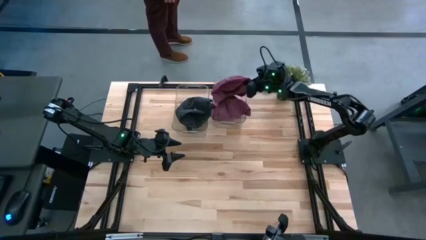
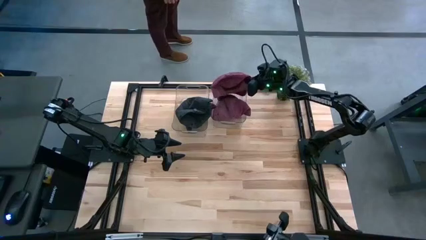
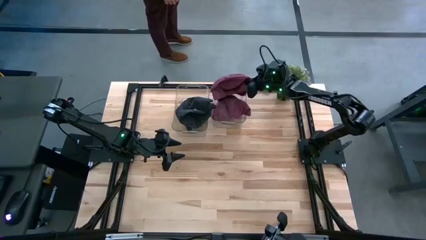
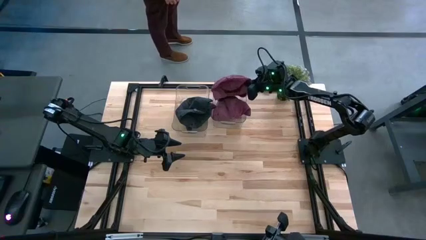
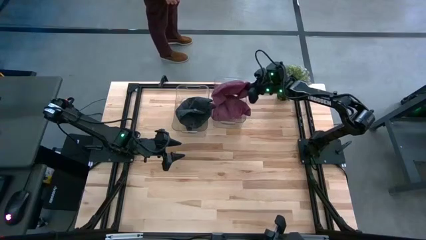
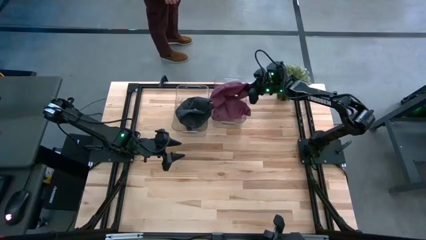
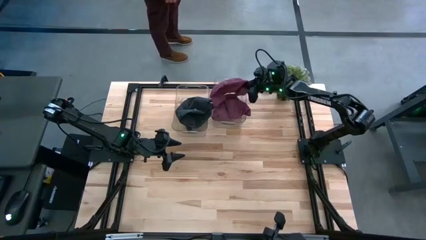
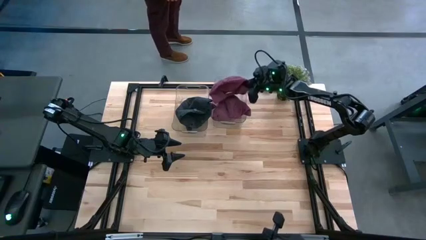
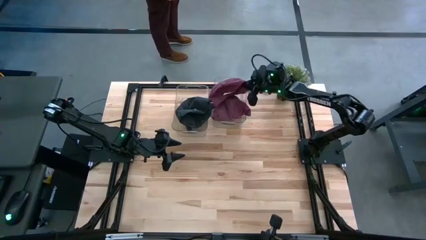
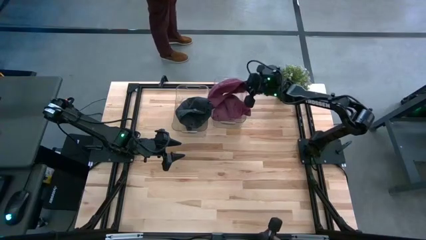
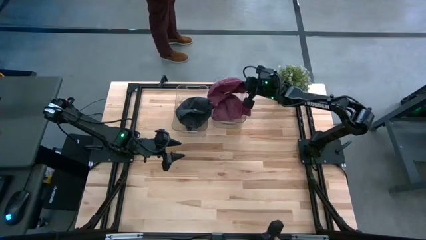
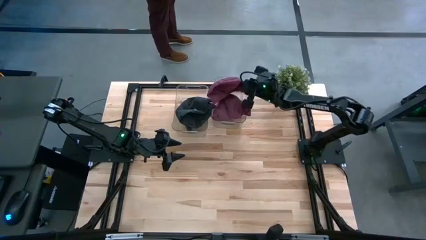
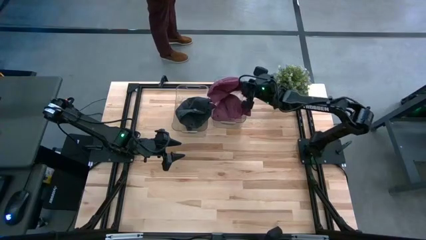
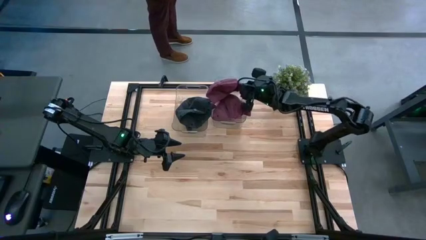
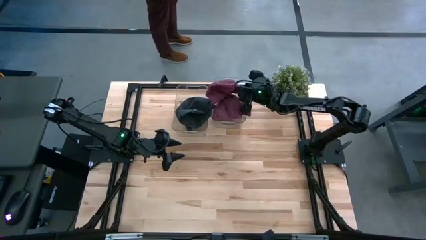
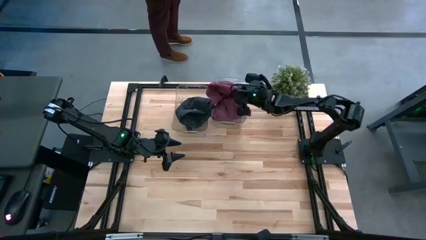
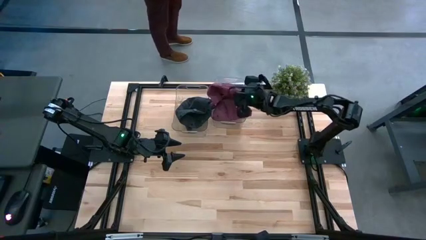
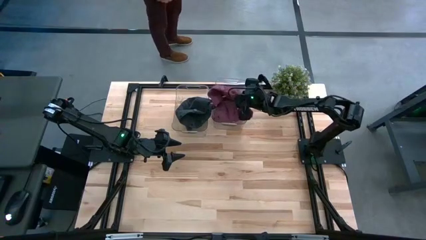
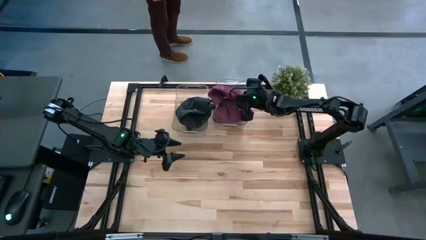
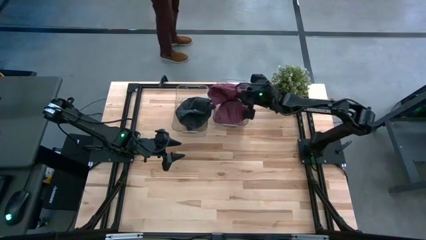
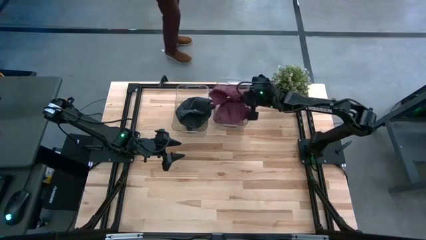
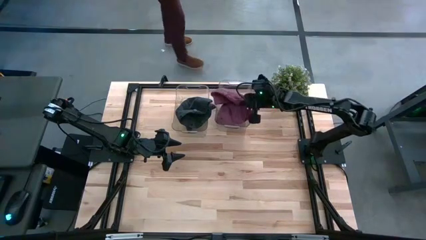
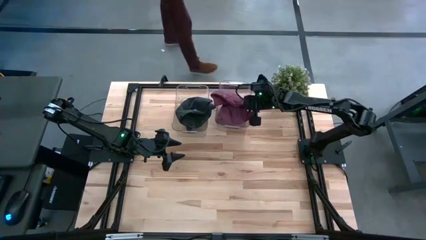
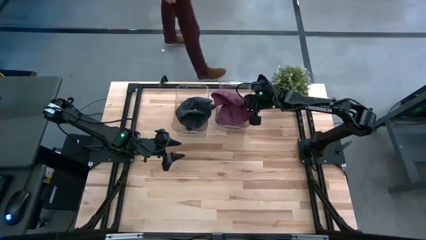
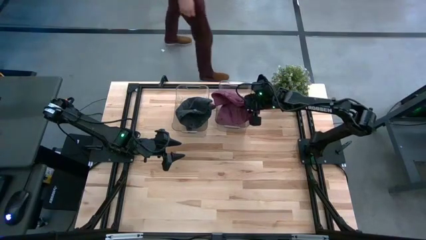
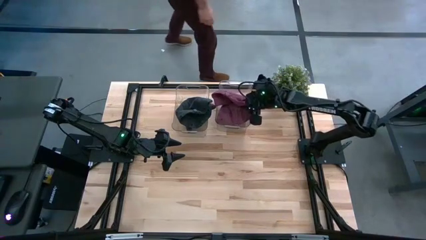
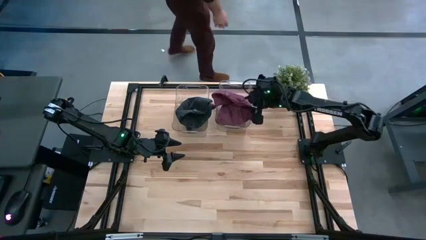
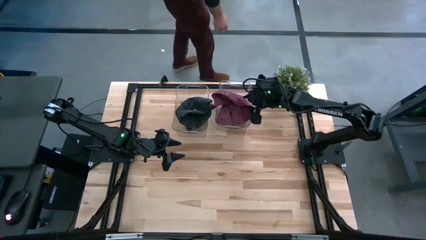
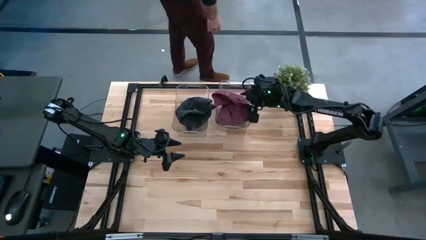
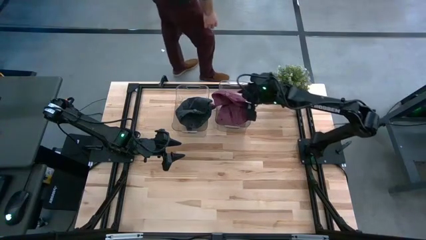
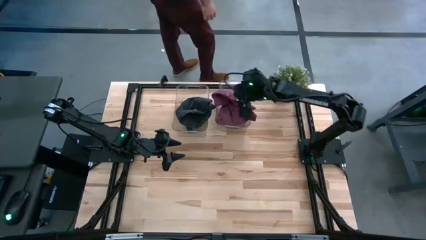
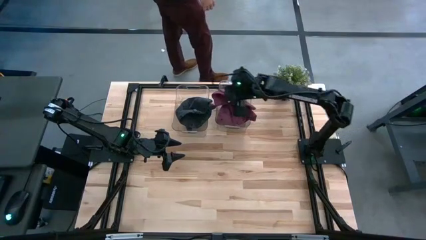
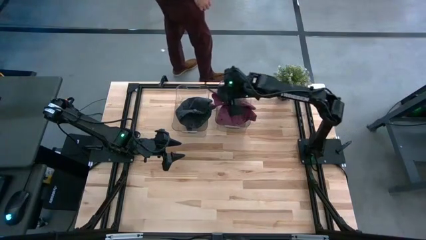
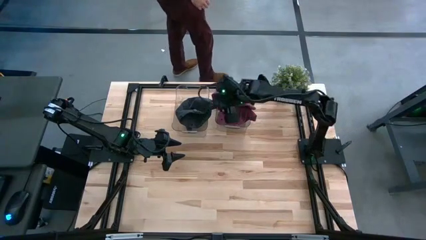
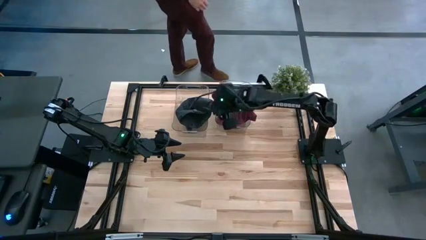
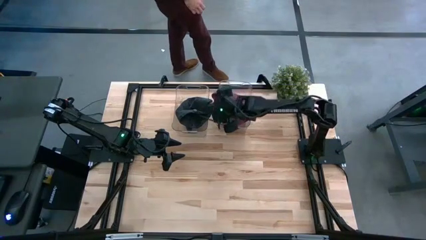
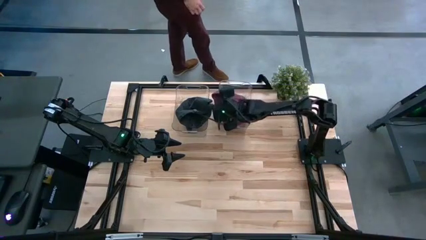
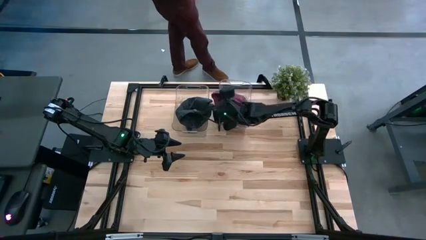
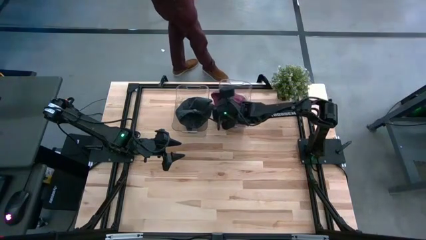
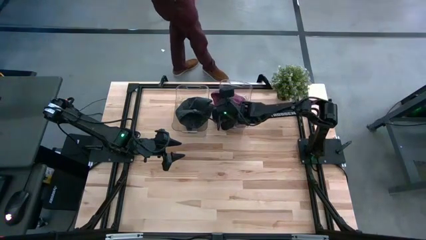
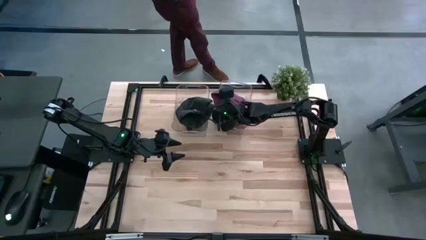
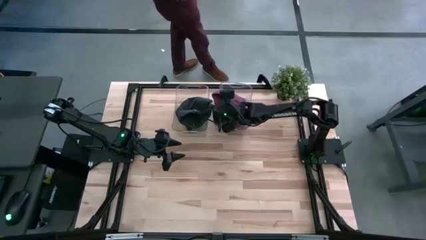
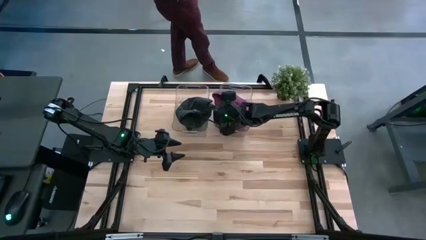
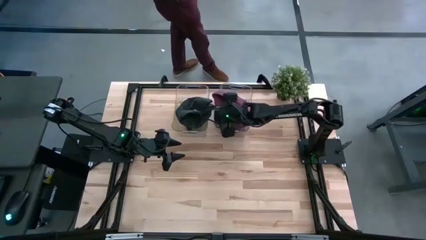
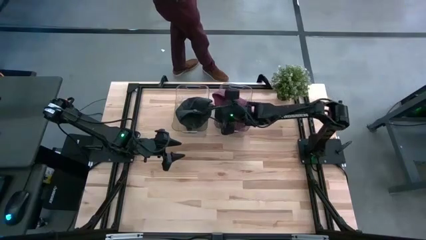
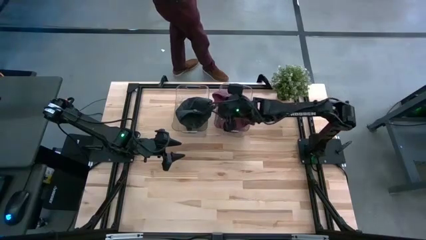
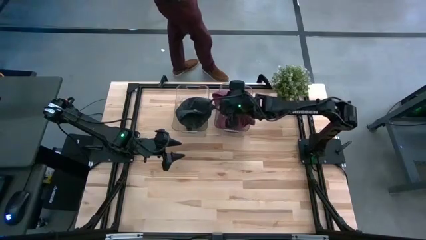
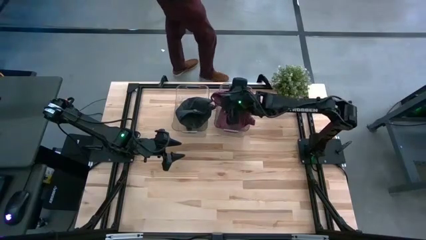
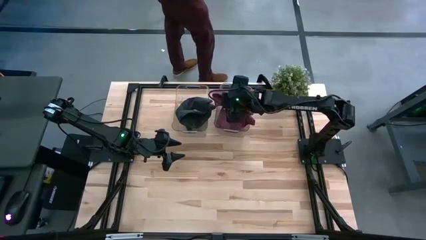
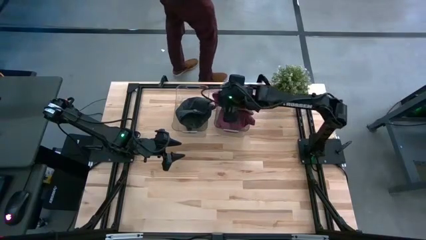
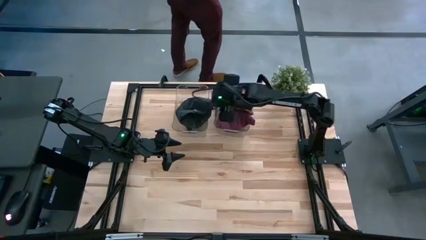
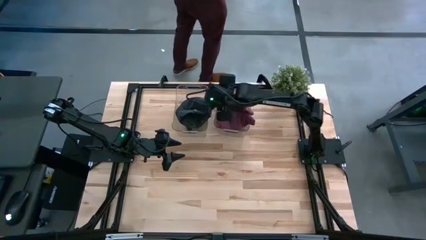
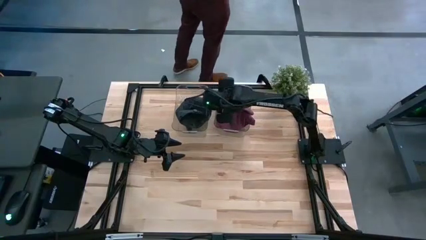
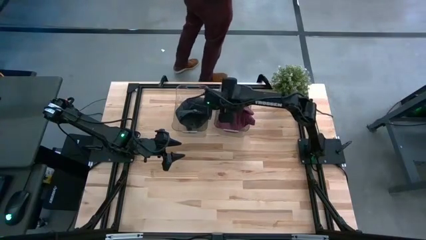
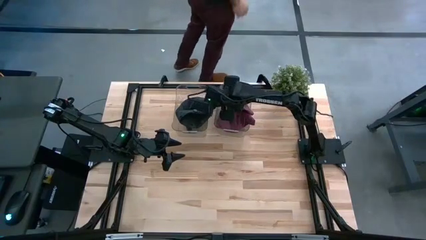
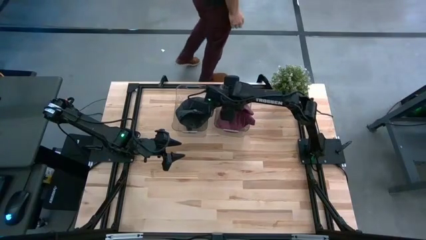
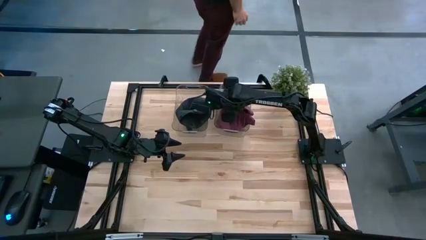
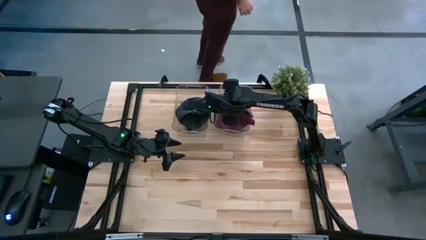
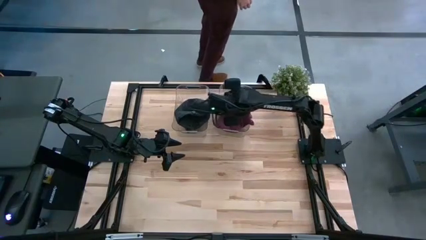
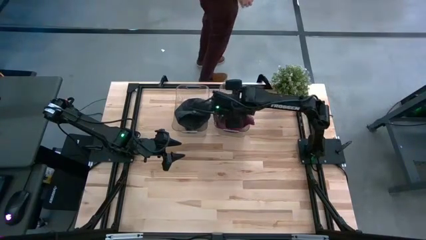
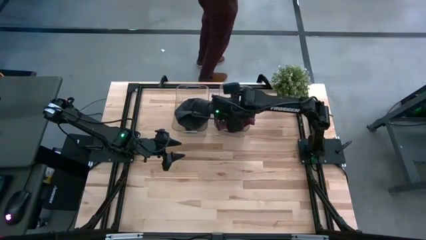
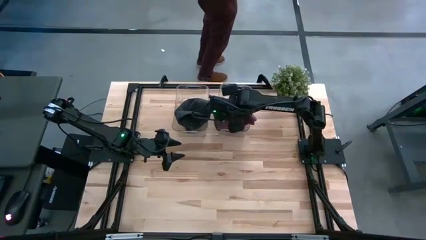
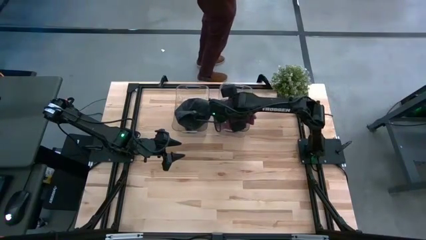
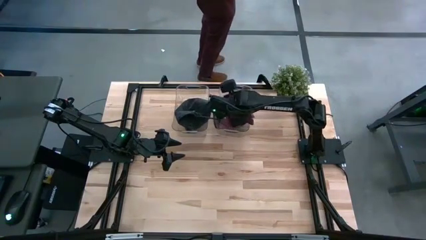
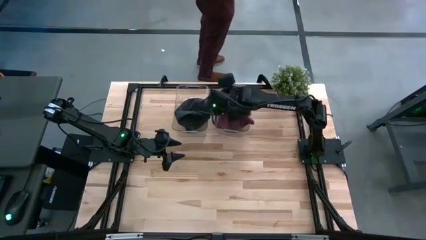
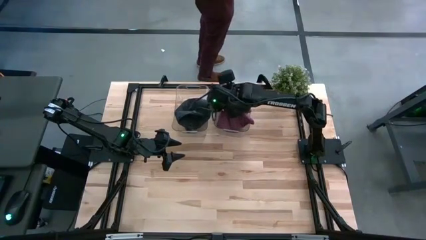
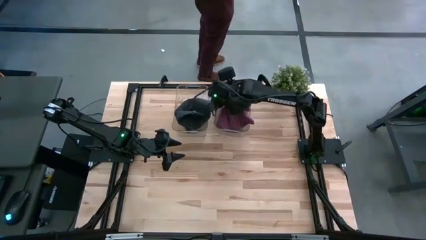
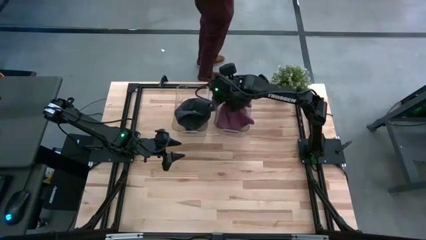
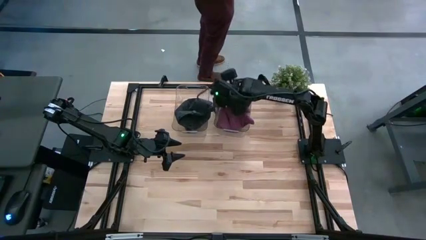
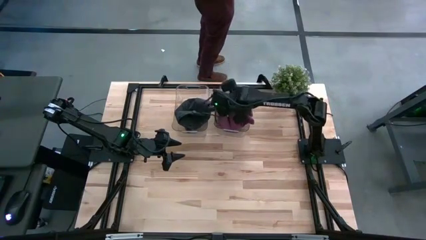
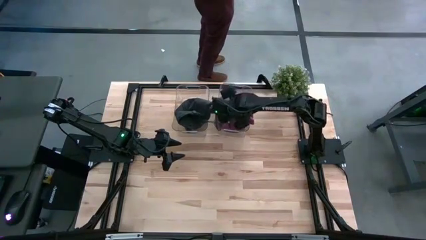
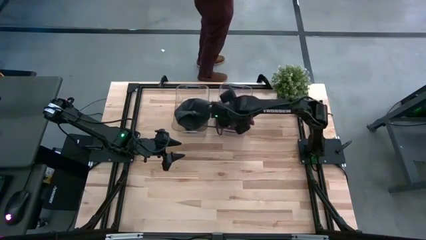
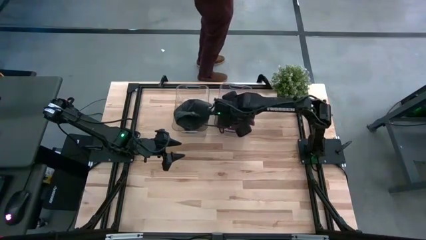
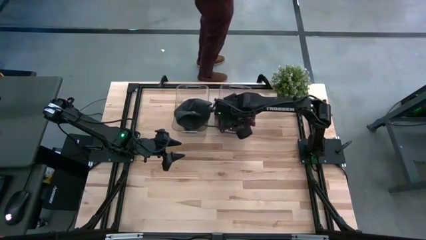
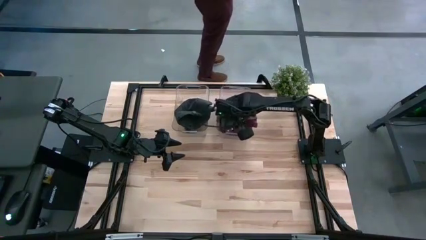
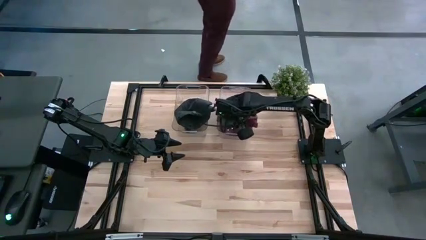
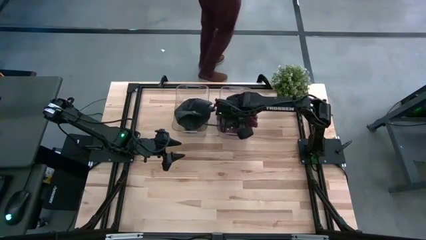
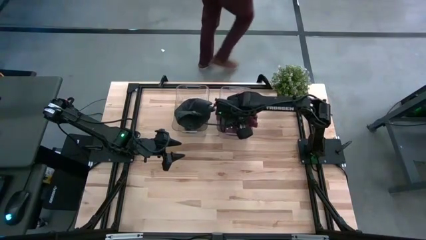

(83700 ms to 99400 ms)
Task: Pick & Place hat
Put the red cap into the right transparent bin

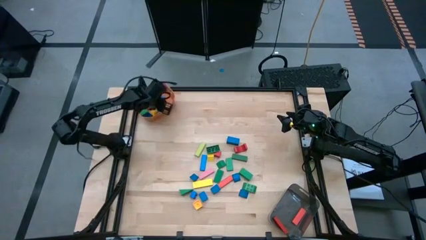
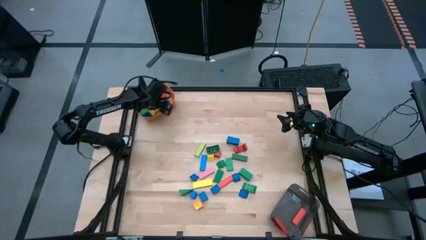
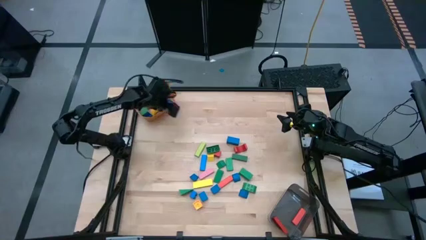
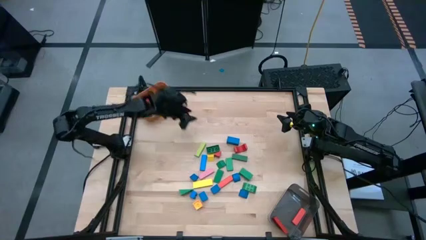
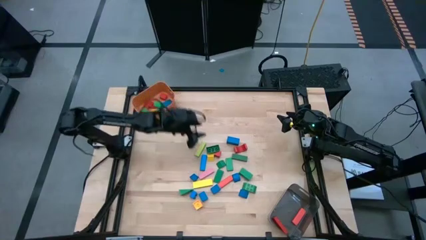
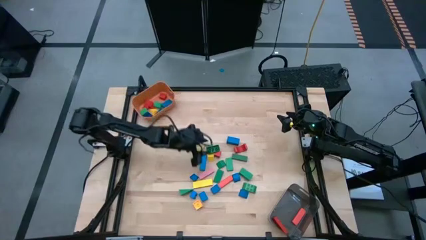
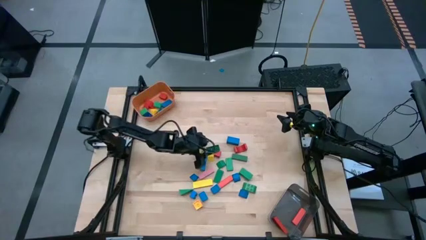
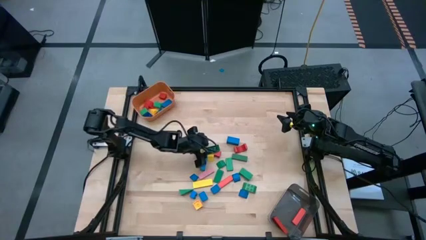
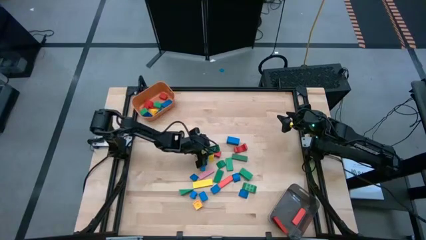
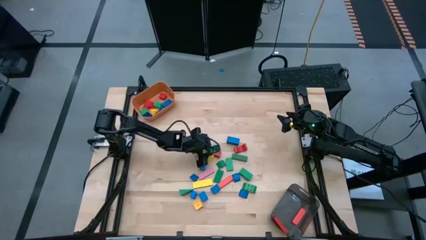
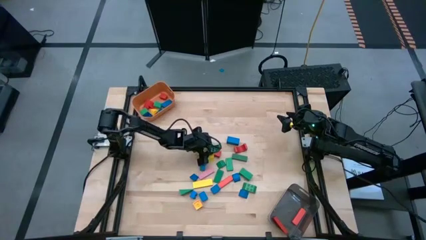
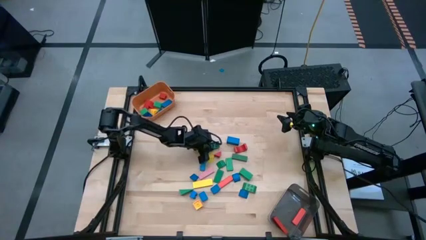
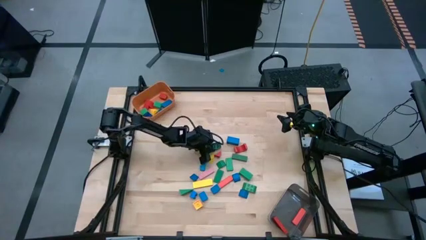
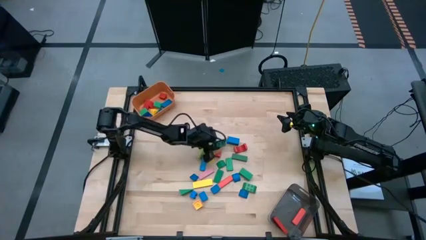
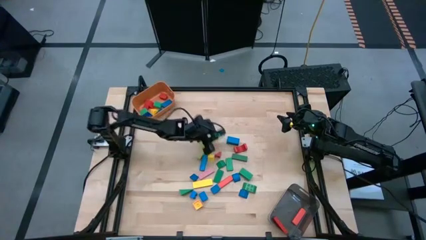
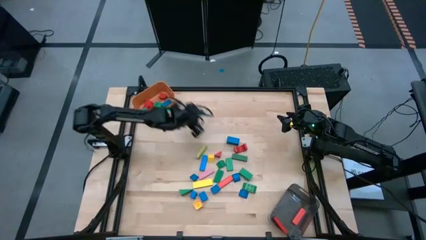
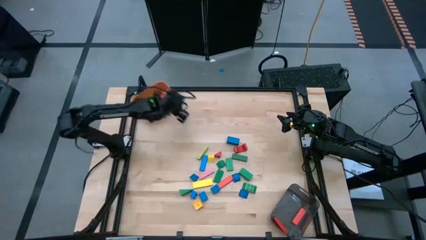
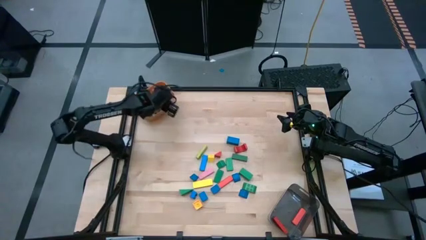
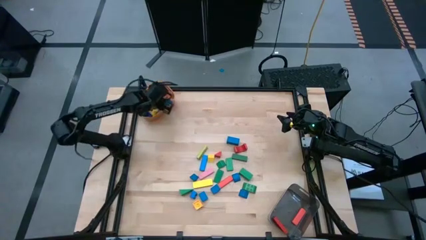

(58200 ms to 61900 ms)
Task: Sort blocks by size
Put the small green game piece into the orange bin
